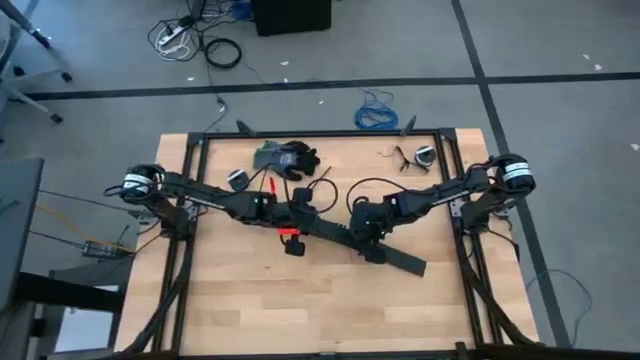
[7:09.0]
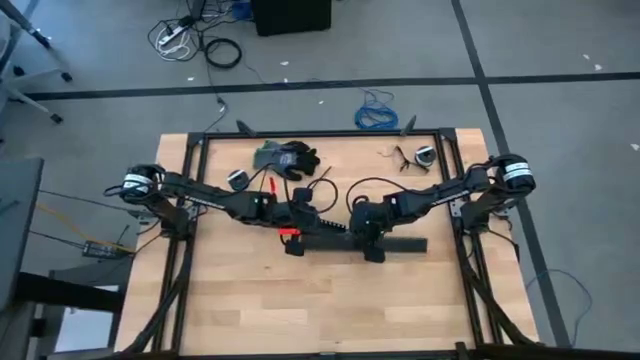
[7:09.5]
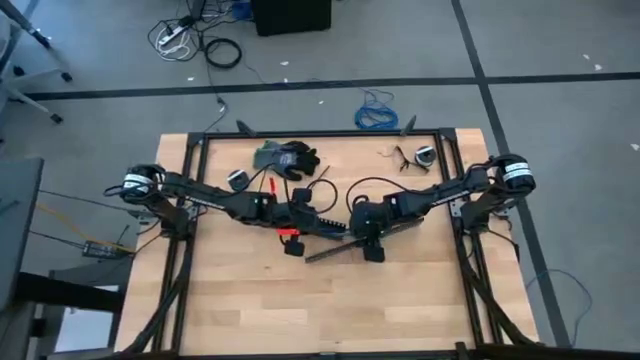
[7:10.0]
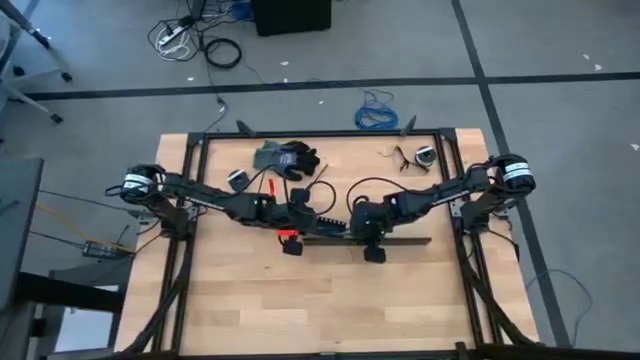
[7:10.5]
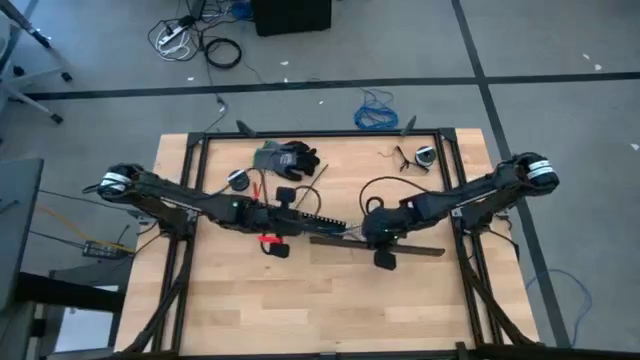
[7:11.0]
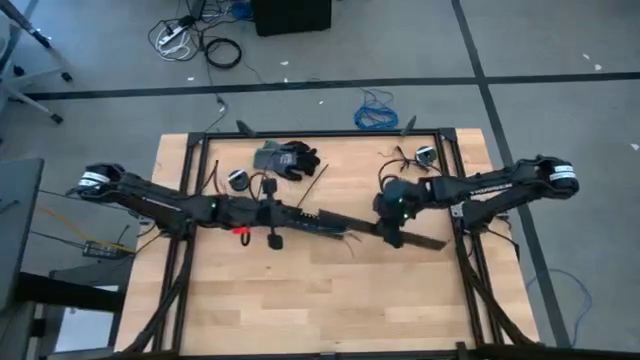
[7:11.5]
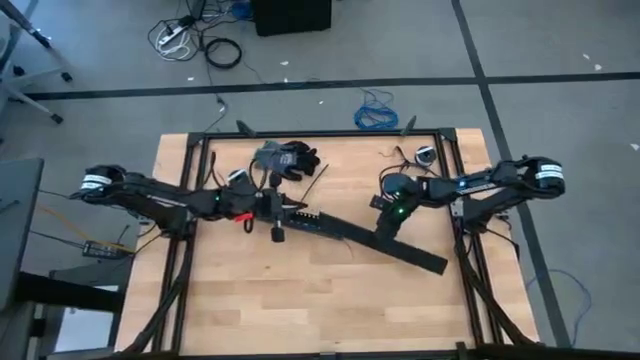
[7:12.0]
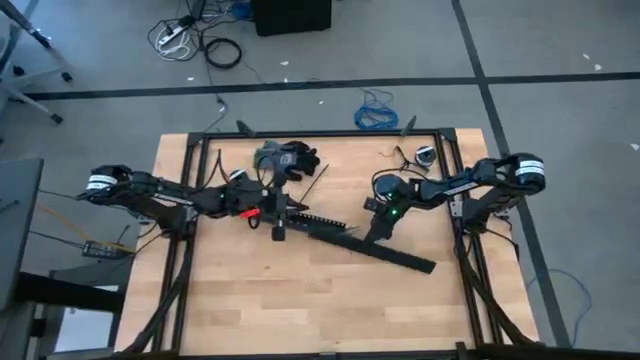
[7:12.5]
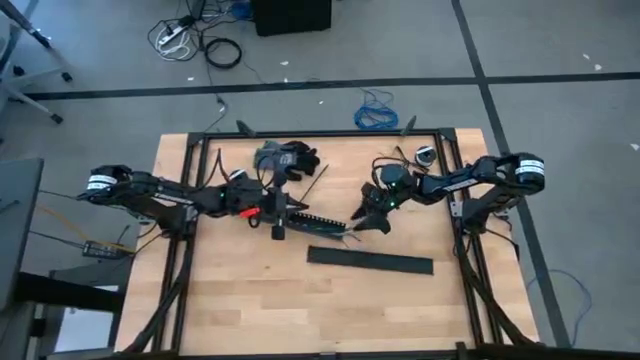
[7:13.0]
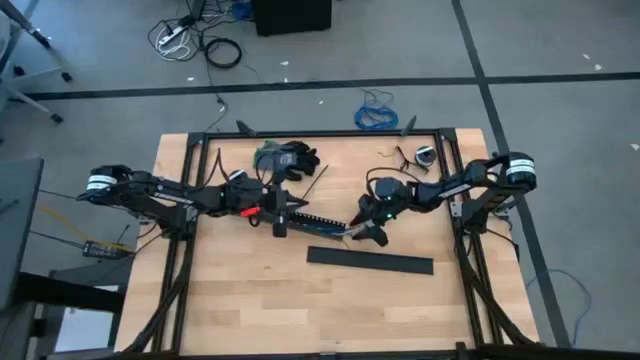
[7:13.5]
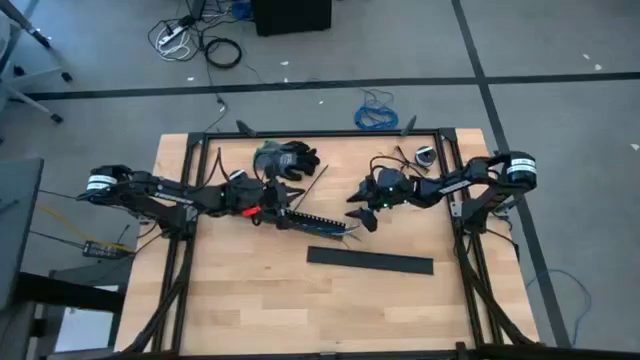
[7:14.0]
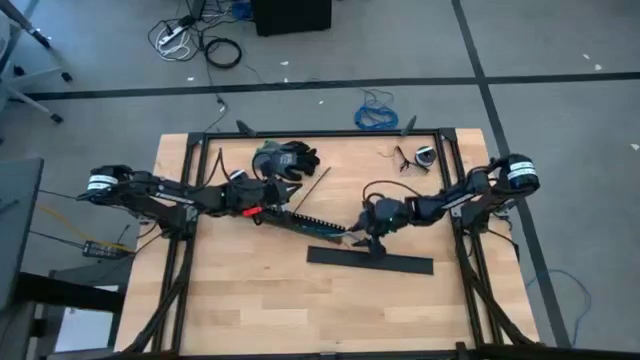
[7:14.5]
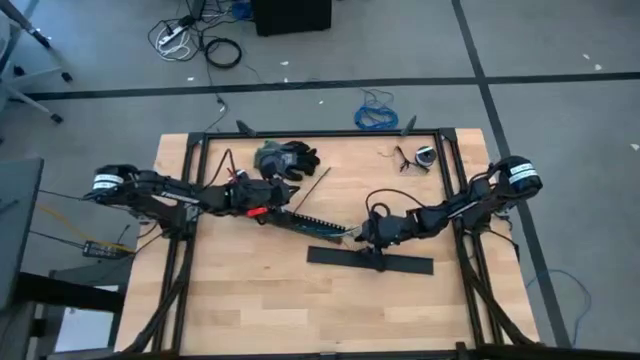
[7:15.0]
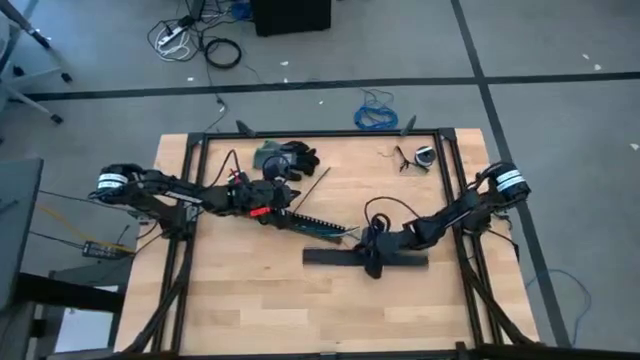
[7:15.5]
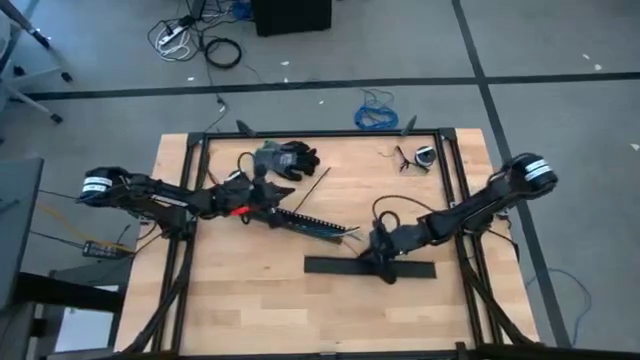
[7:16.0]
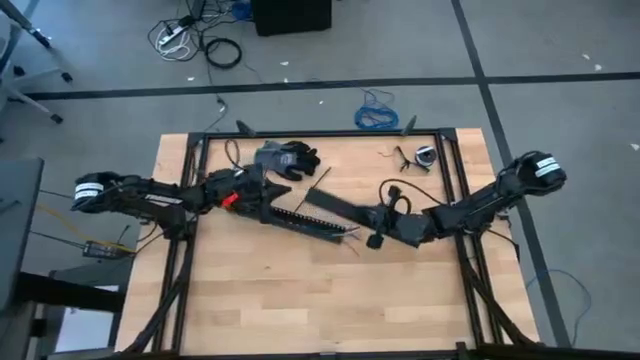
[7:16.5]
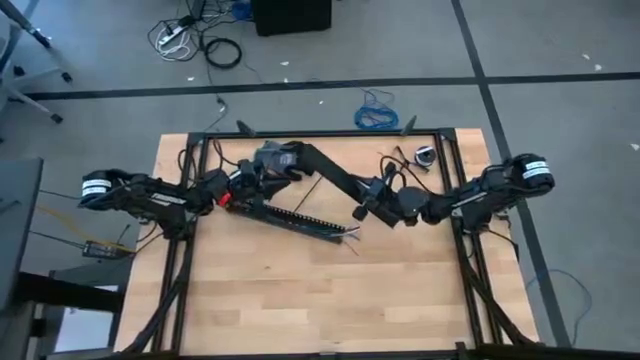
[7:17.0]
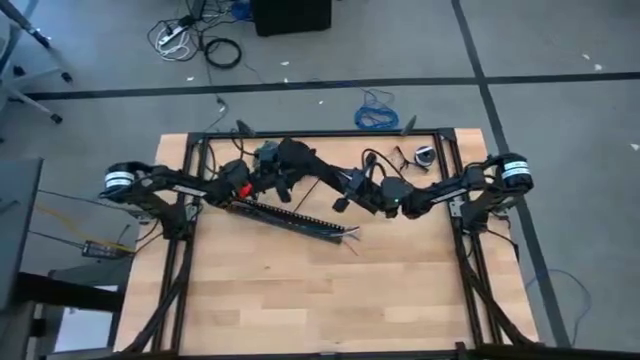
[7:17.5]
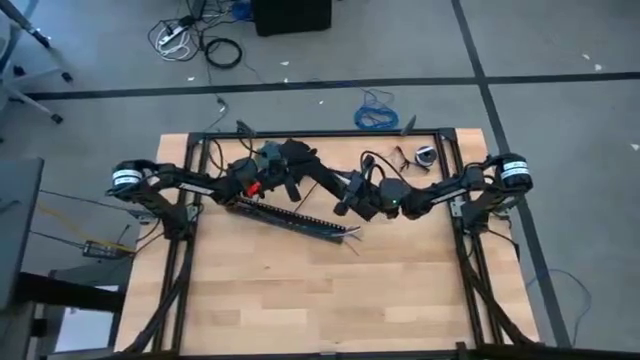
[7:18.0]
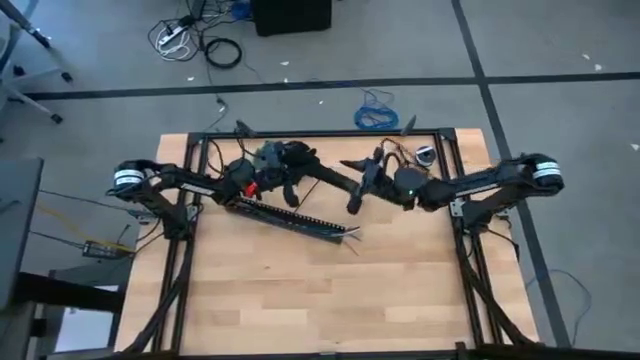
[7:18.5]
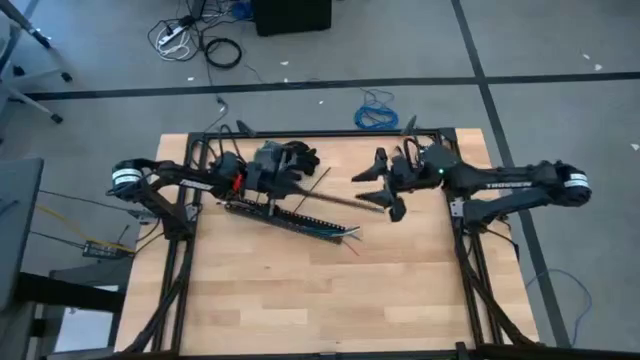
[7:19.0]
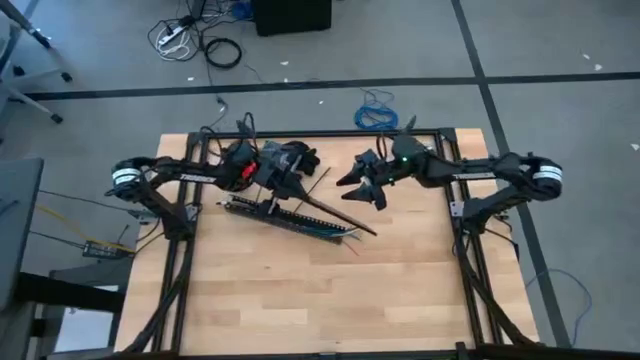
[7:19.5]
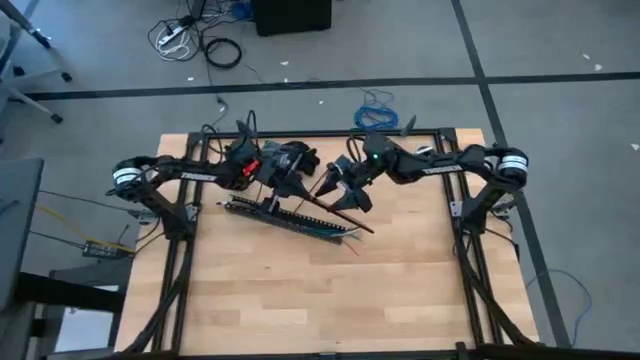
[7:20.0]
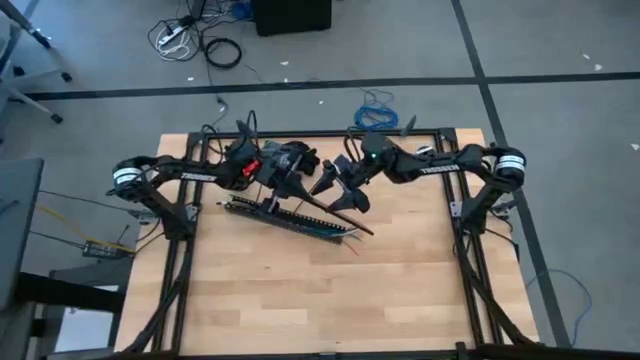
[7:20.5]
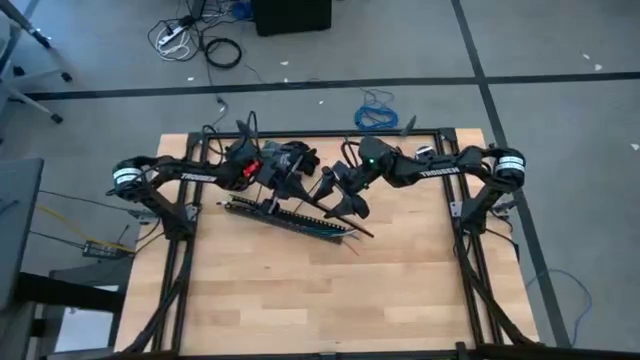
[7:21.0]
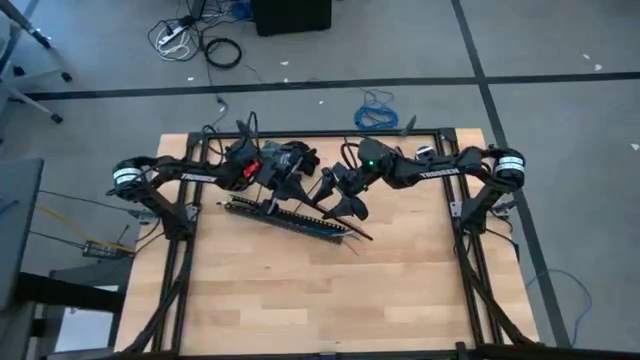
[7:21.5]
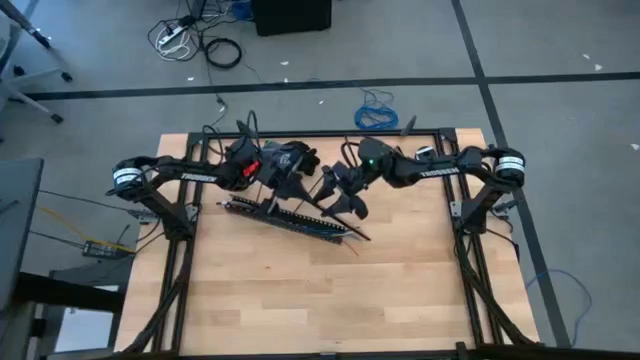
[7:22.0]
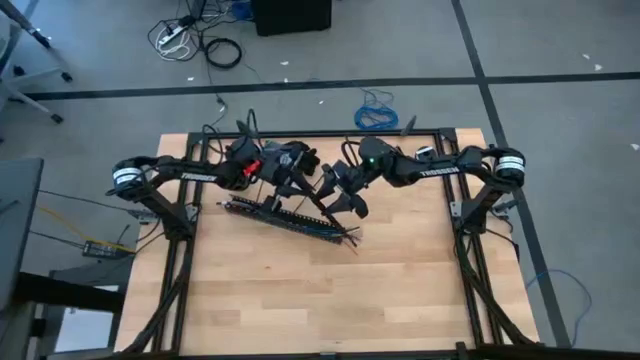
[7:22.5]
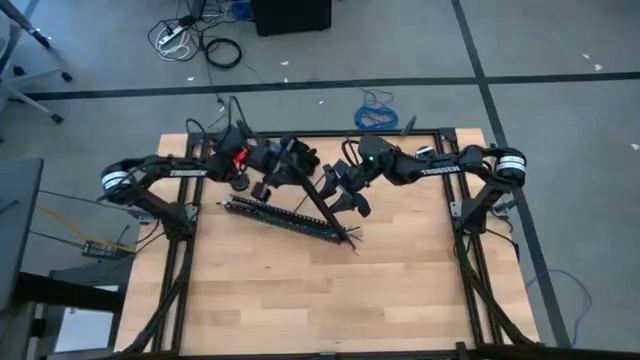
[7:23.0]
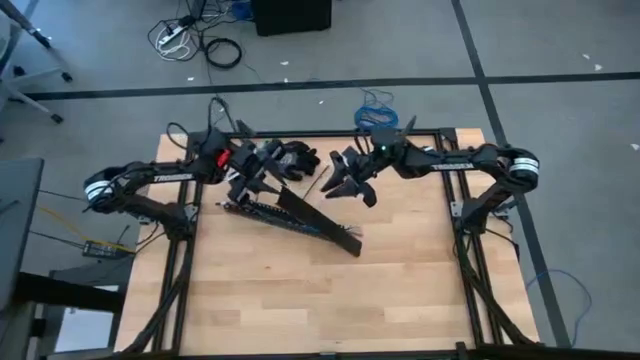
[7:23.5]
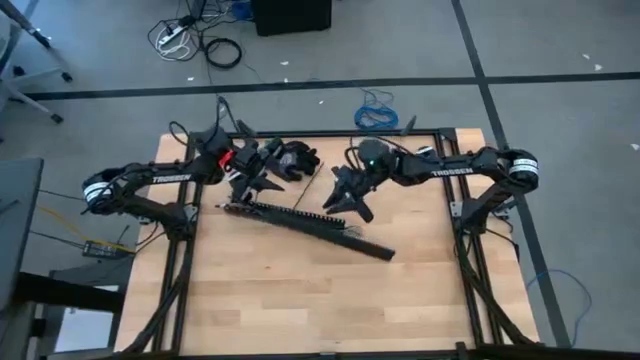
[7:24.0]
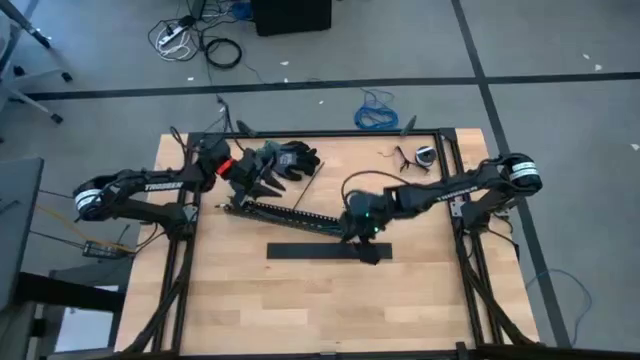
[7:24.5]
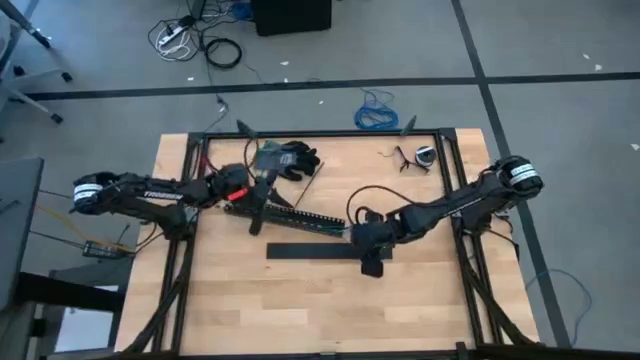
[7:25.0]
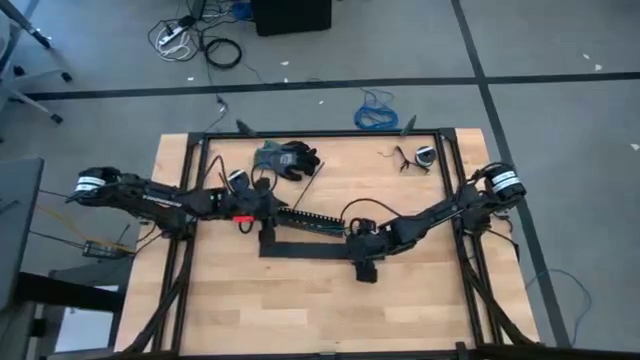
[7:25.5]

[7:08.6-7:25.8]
Task: Ziptie cables
Close the black cable duct cover

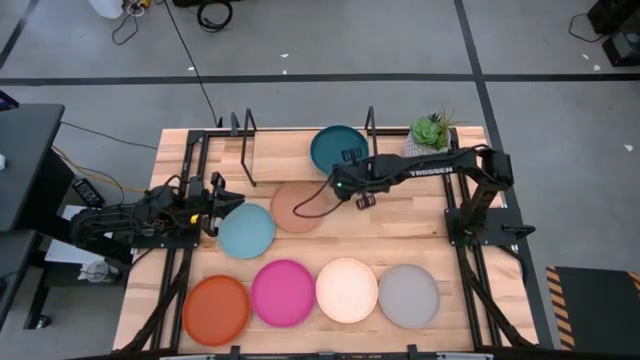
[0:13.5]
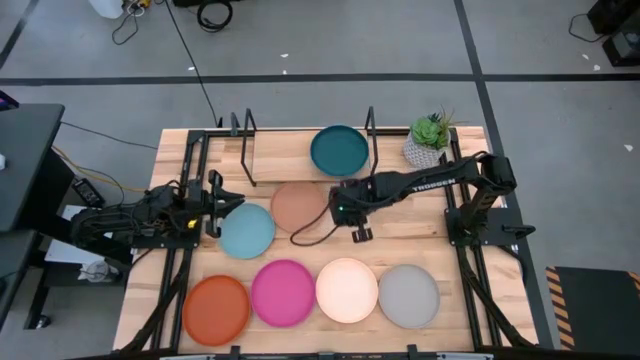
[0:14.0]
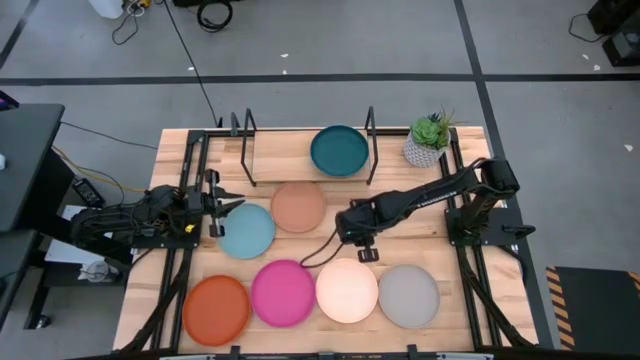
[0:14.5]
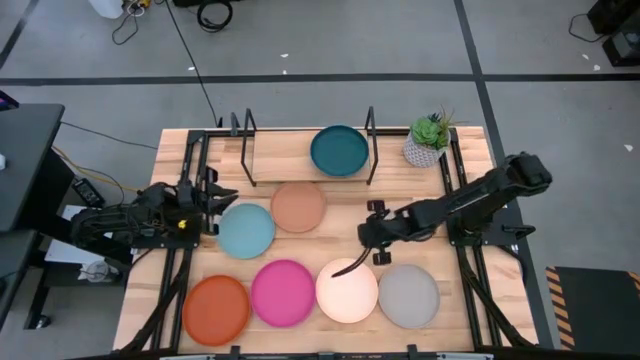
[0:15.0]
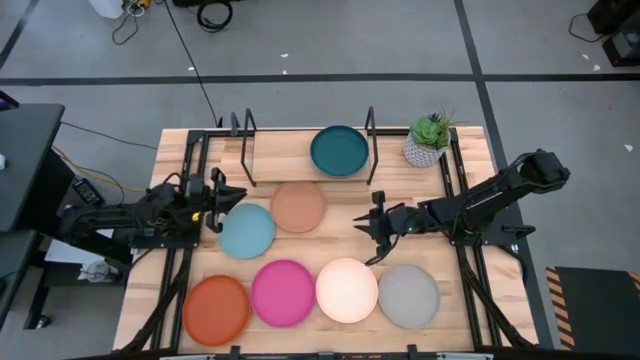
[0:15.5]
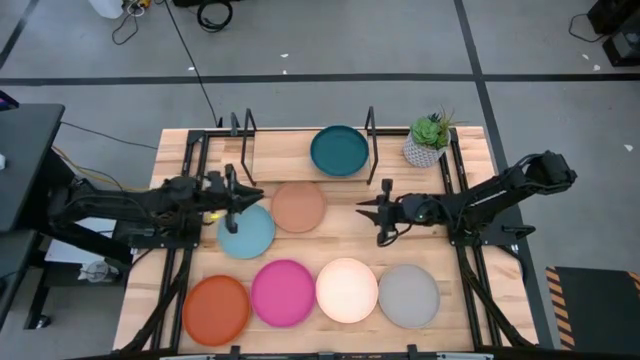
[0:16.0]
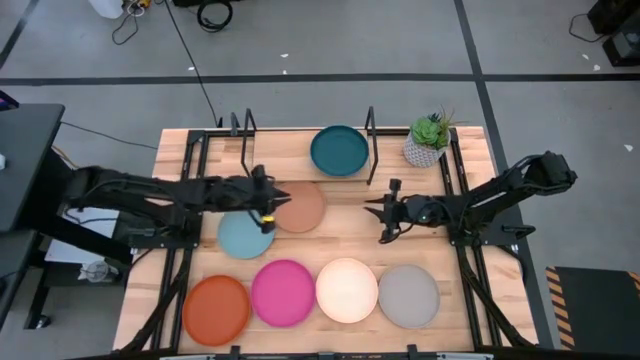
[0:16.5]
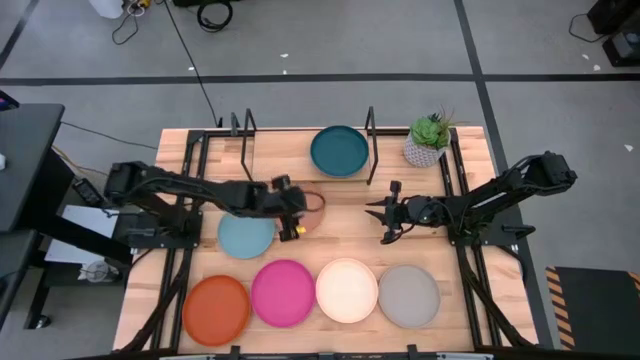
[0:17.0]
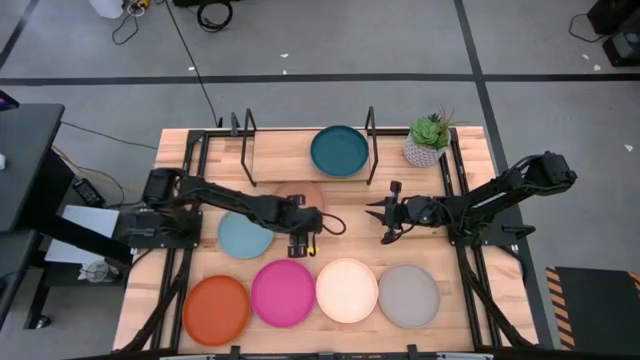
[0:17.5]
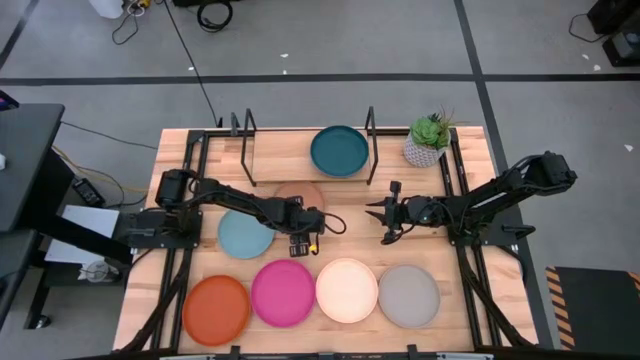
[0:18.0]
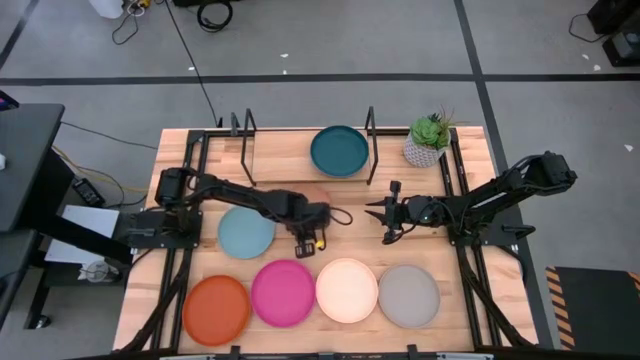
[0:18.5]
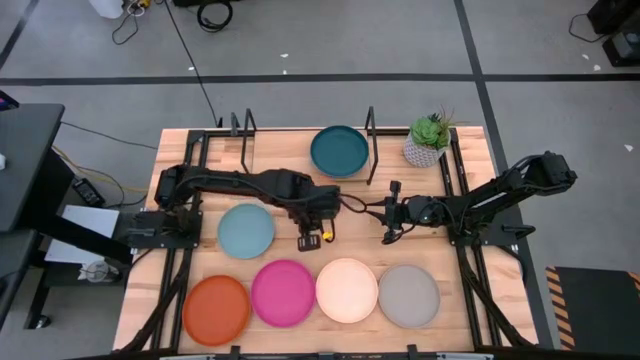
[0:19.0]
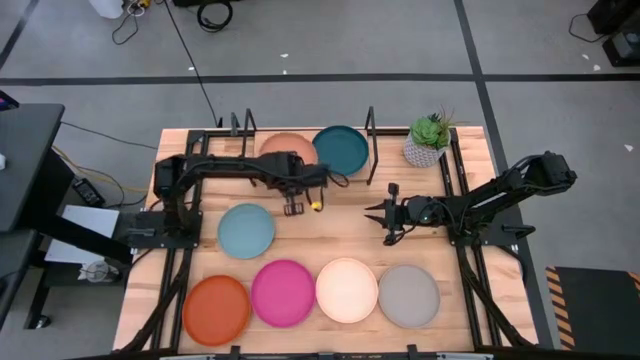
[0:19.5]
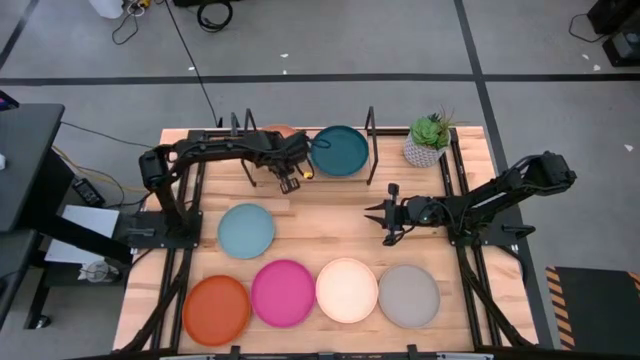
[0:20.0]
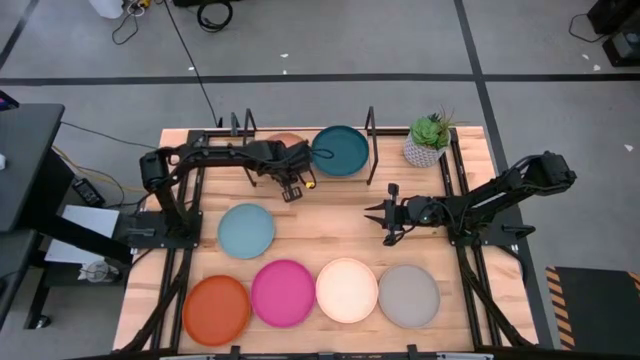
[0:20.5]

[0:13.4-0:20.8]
Task: Place and stack plates onto a shelf
Put the light orange onto the shelf
